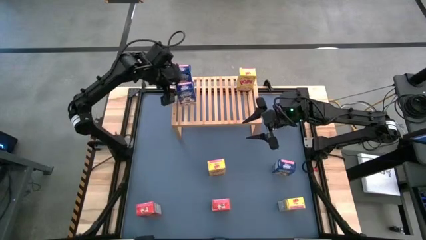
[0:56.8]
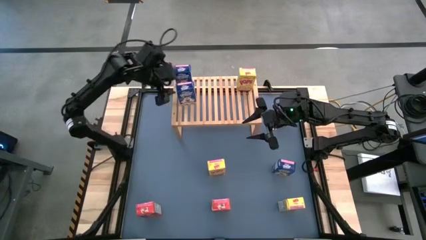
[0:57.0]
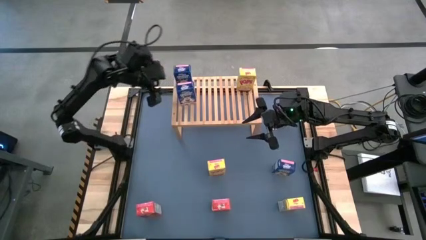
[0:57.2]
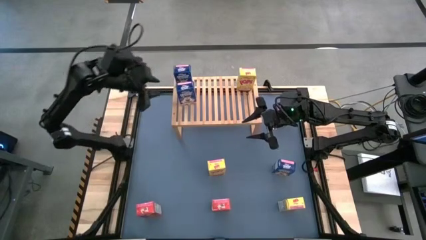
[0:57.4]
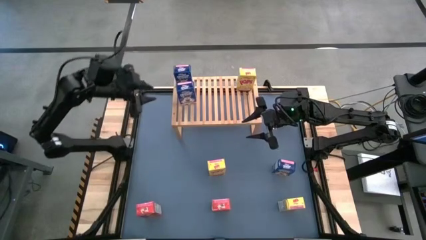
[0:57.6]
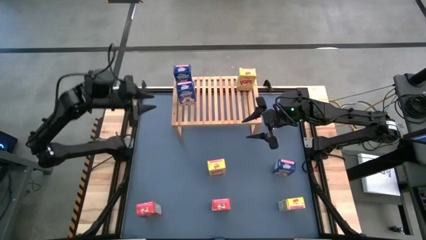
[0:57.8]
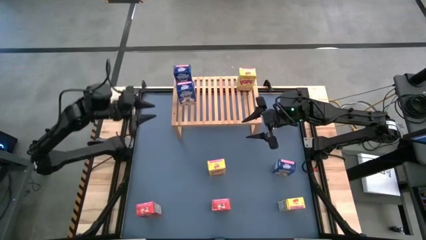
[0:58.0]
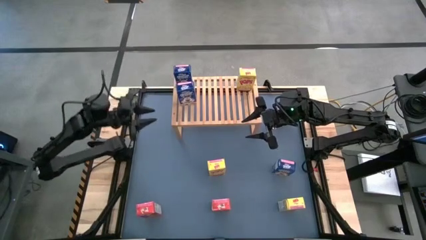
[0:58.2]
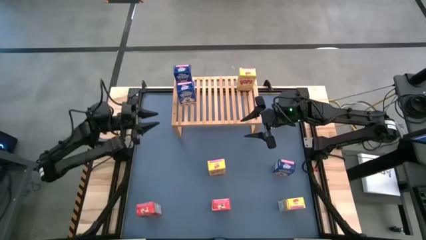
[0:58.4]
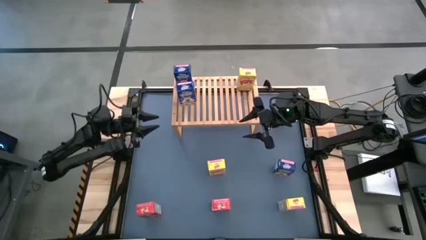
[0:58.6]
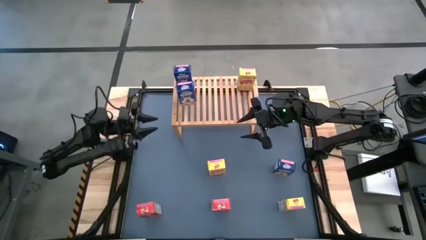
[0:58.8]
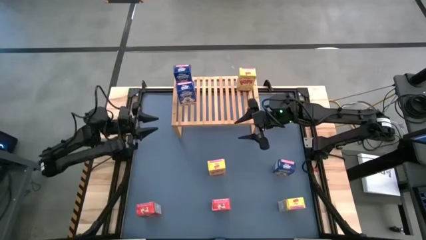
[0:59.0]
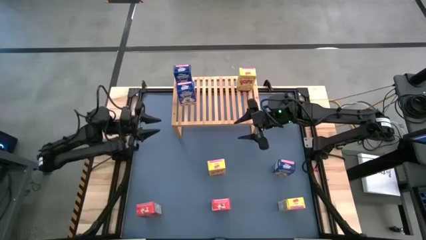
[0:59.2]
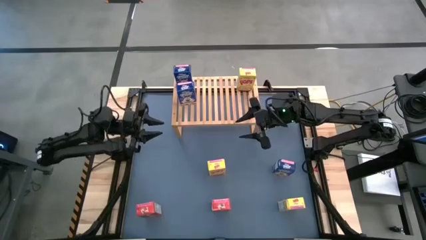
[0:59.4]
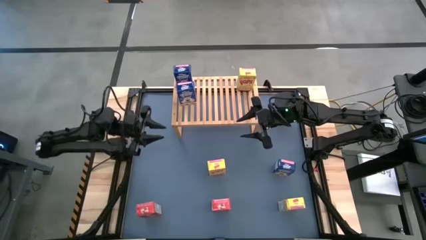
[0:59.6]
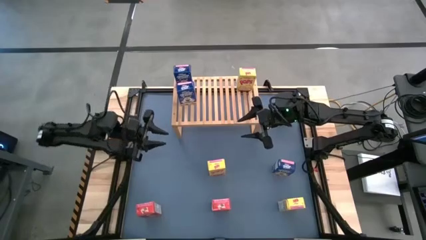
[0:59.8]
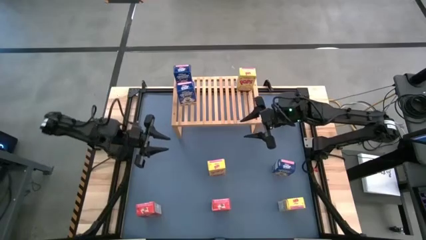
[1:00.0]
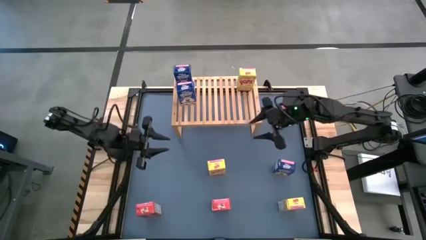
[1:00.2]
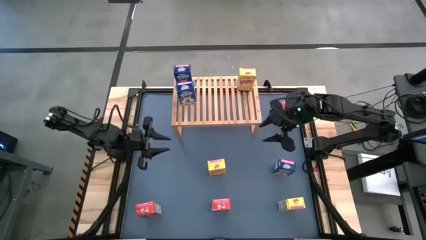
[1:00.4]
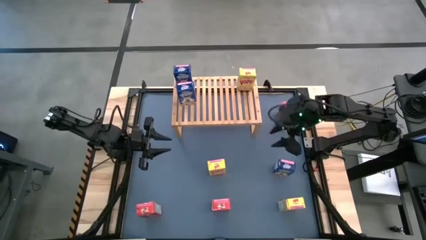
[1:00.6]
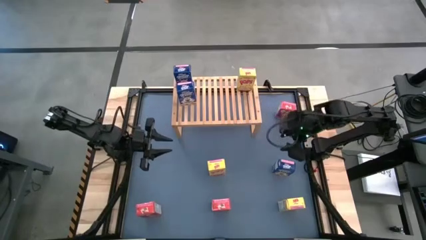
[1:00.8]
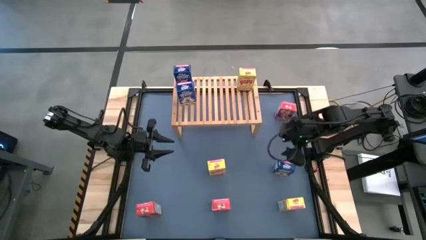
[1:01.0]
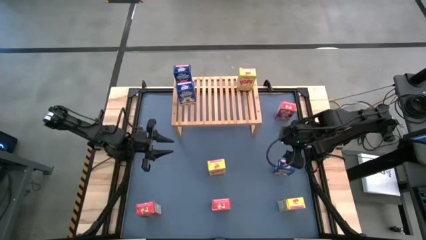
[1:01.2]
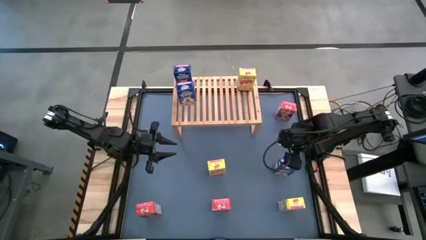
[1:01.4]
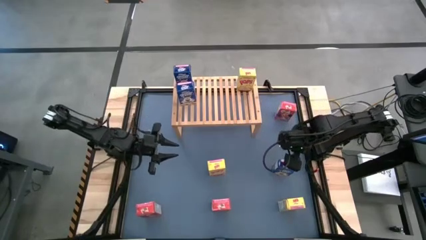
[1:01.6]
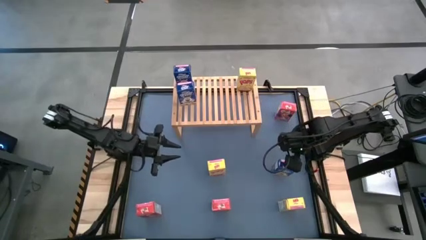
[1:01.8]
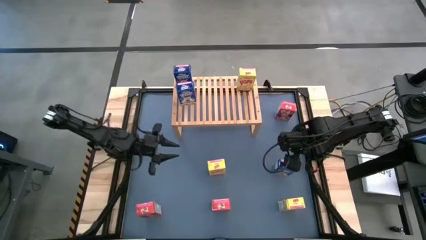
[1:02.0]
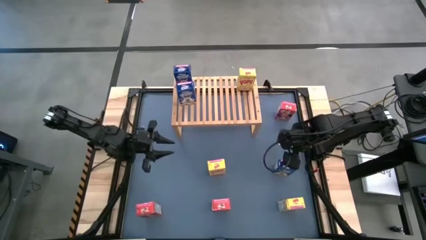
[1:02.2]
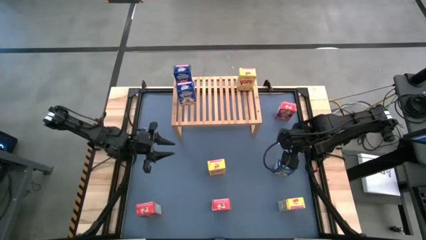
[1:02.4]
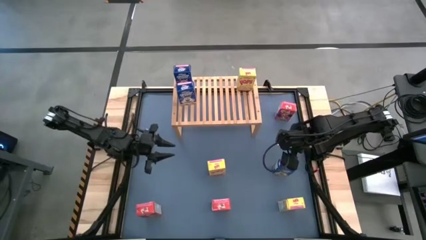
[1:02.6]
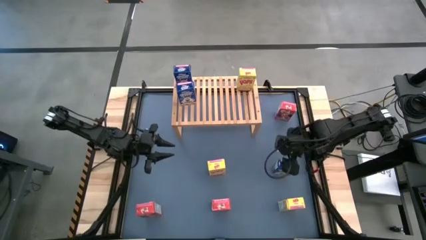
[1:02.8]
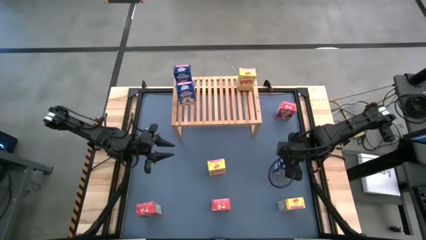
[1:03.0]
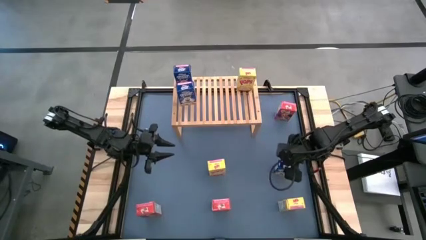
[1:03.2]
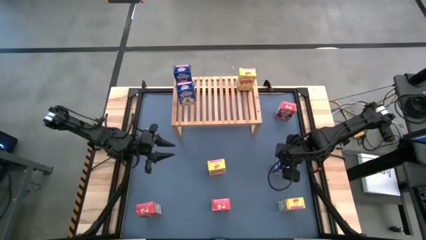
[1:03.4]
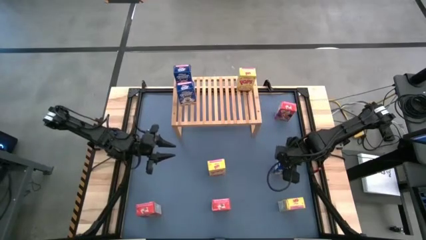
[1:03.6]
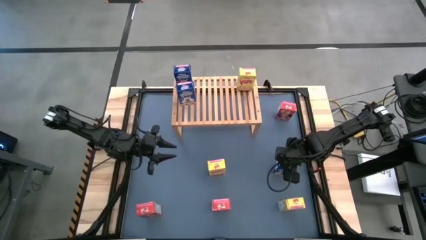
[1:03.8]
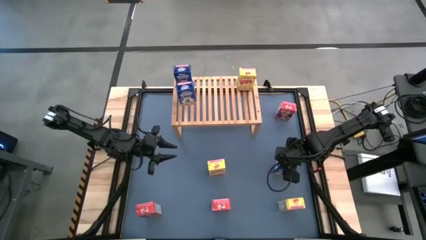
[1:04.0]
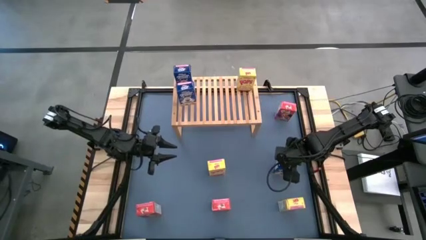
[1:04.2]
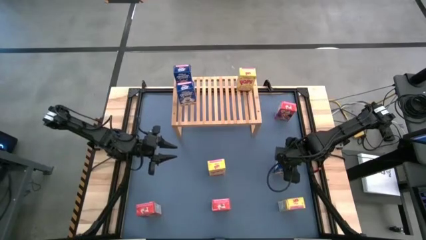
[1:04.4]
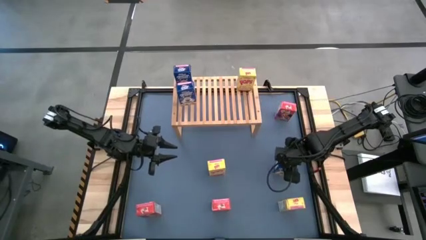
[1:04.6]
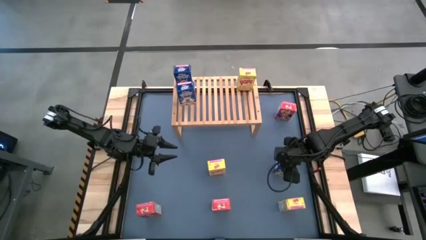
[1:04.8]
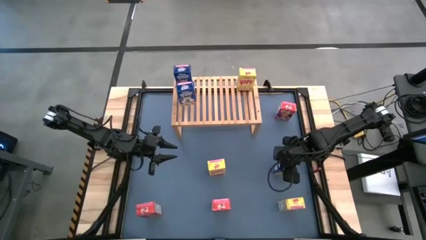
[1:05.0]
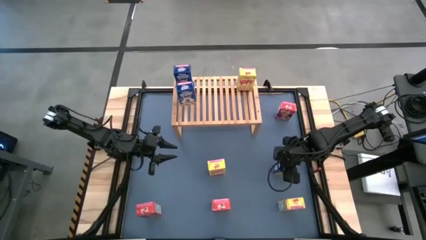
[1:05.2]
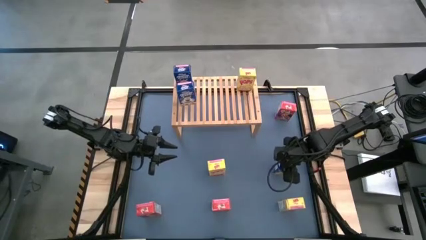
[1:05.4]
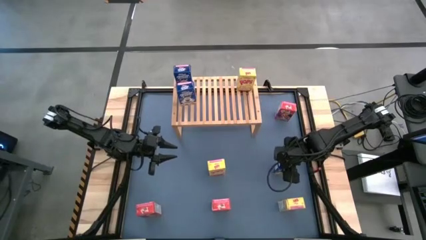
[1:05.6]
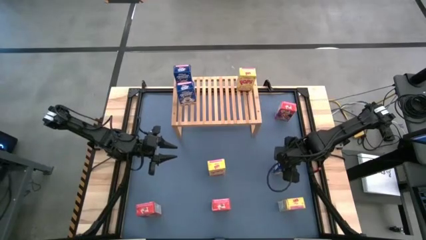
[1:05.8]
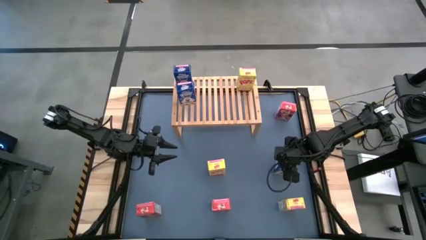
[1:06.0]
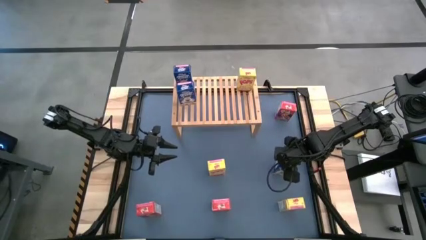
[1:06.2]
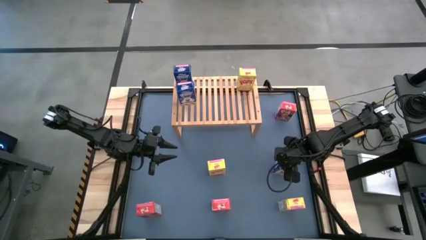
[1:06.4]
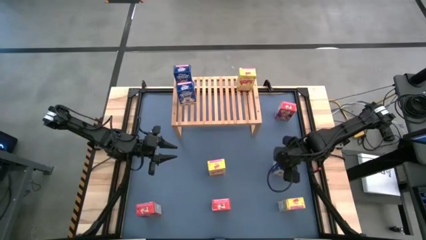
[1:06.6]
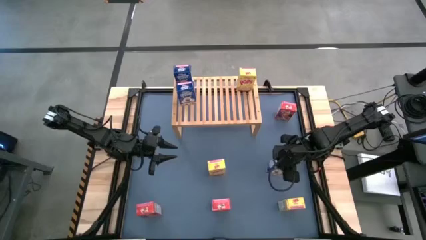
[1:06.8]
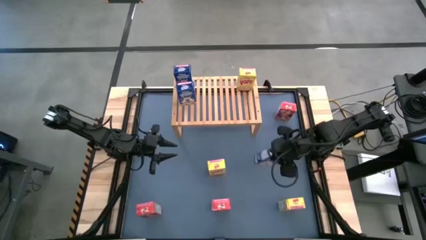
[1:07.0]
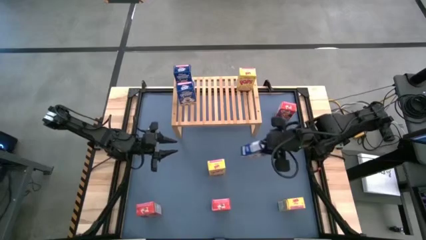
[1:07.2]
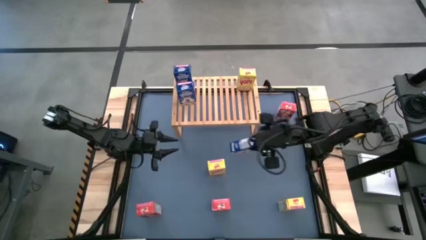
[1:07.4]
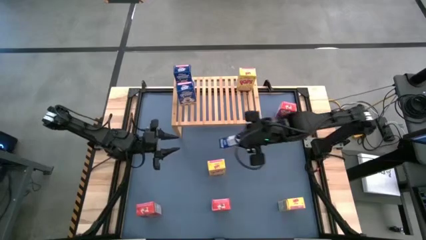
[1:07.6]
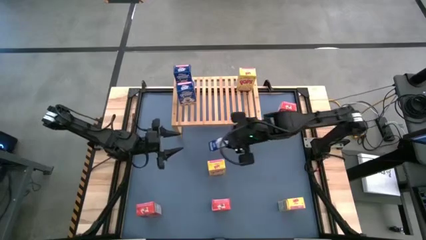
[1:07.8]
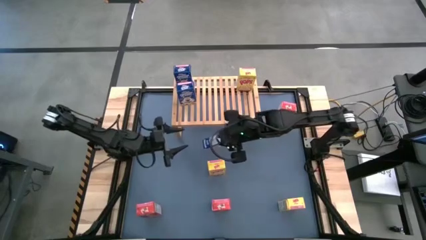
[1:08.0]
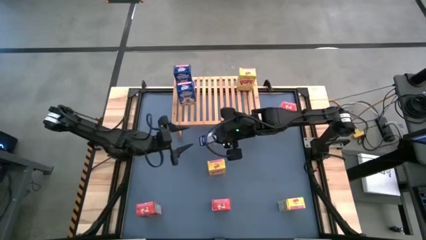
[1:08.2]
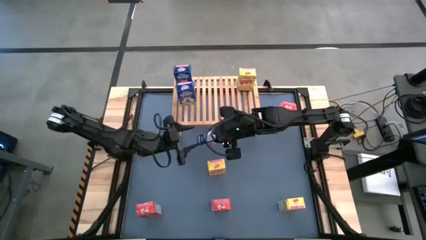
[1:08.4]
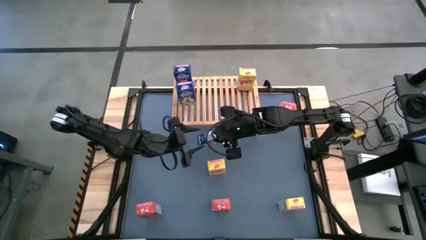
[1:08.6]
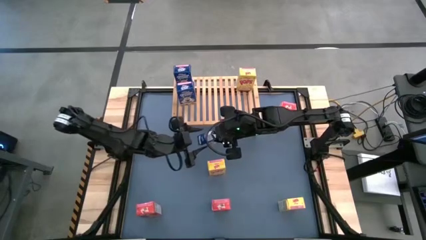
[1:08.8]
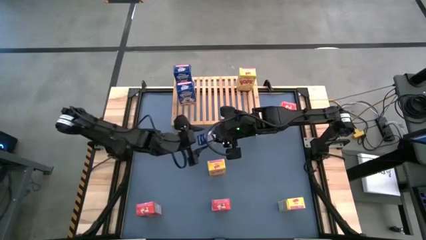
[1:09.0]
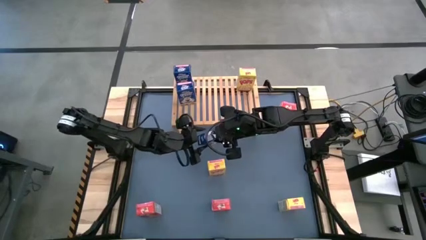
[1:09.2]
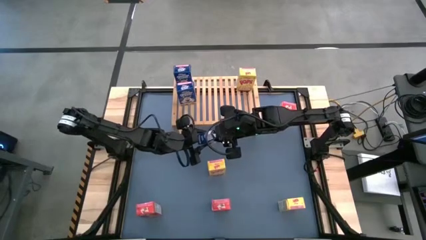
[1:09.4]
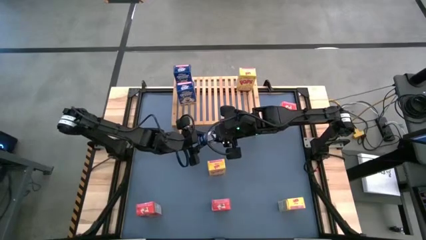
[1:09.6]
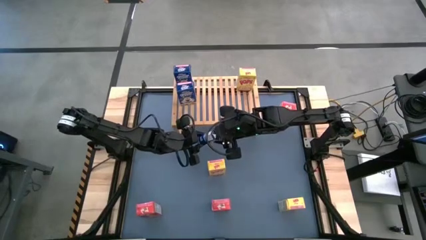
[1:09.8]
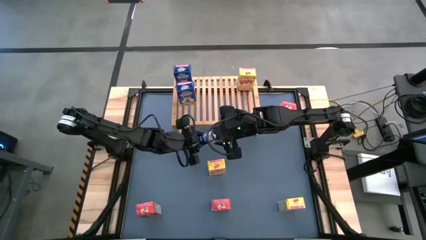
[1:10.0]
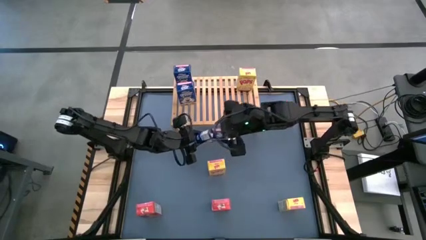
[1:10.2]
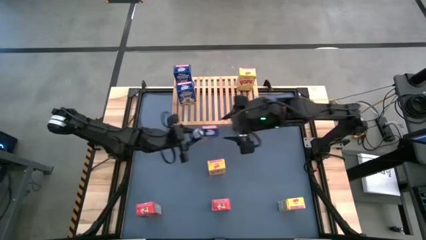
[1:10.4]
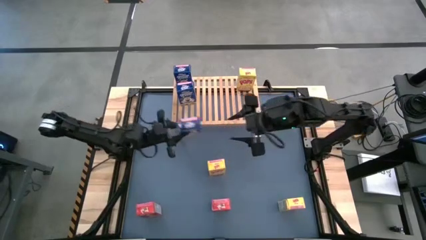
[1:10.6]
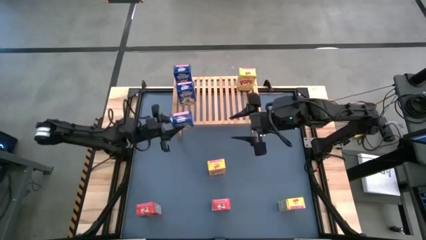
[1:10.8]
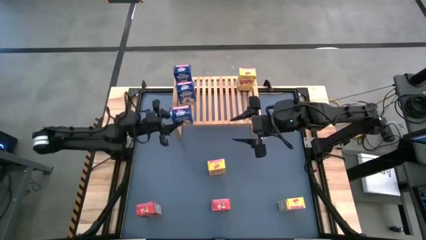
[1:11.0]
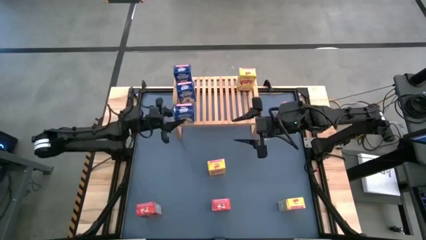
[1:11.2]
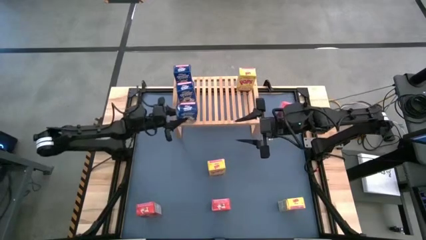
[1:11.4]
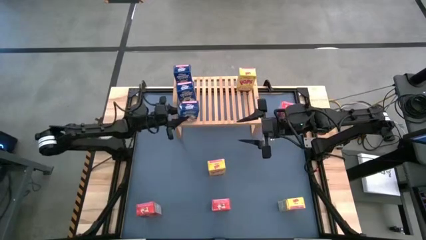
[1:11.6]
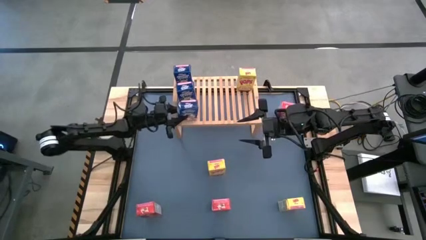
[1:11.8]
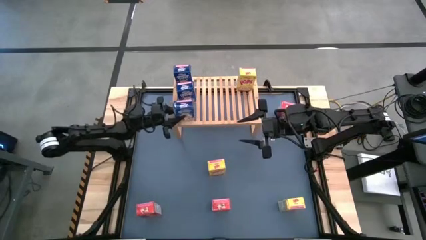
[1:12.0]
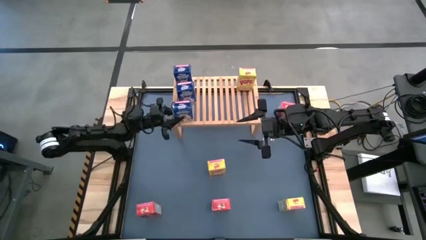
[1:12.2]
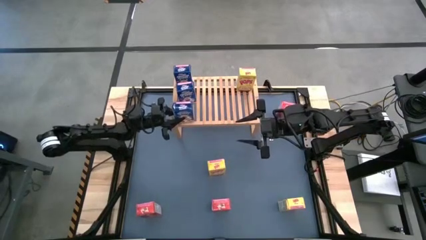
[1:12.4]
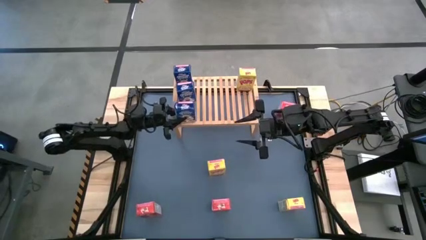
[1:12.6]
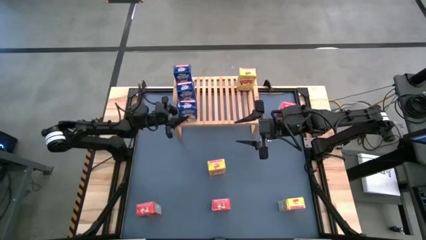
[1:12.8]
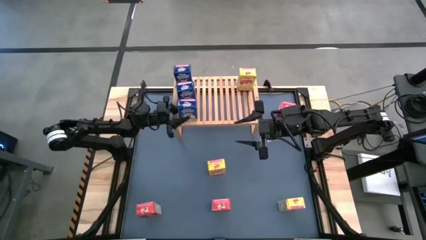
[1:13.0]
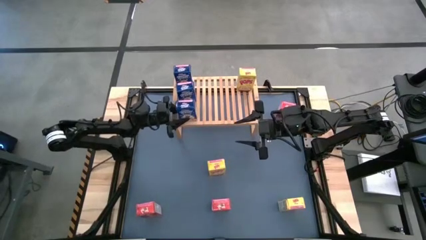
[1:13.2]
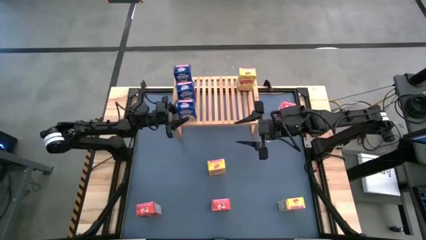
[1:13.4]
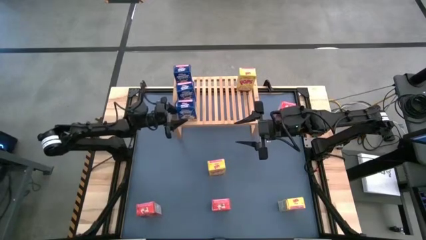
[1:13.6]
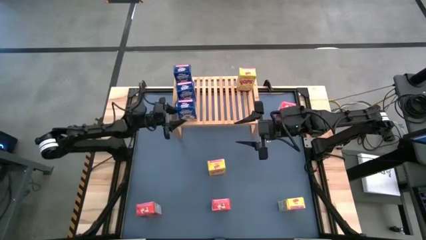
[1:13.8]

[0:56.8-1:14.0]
Task: Stack cereal on shelf
Put the blue cereal box on the shelf aligned with the other blue cereal boxes
